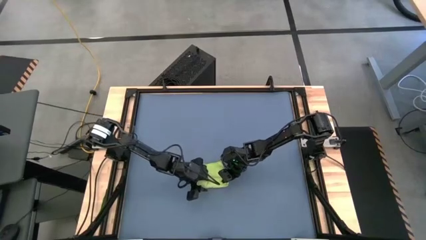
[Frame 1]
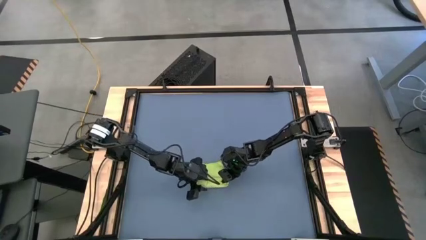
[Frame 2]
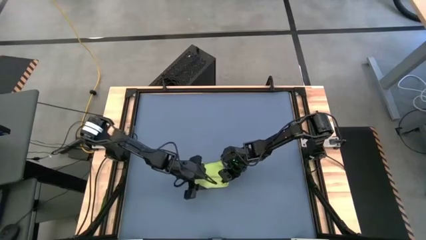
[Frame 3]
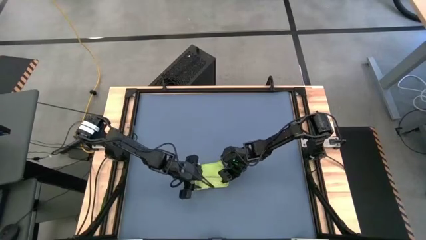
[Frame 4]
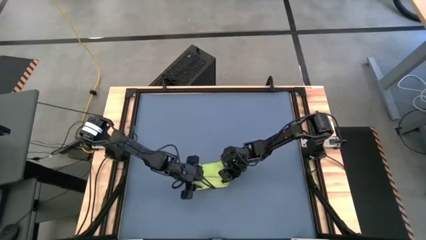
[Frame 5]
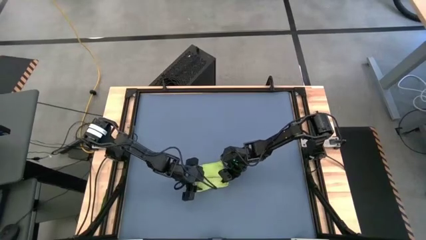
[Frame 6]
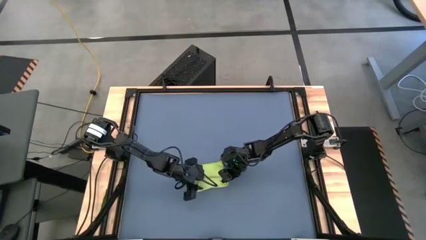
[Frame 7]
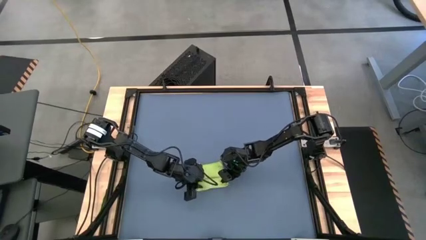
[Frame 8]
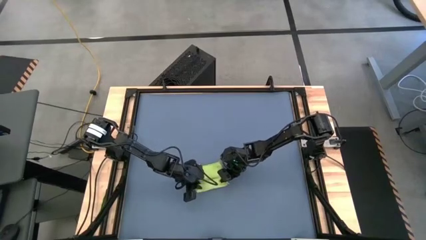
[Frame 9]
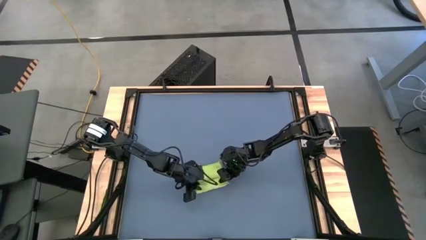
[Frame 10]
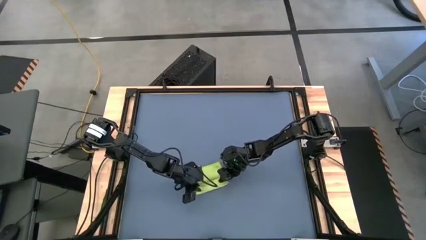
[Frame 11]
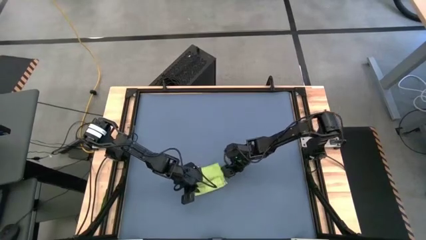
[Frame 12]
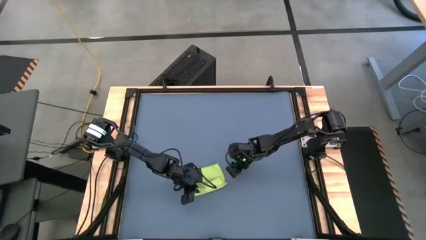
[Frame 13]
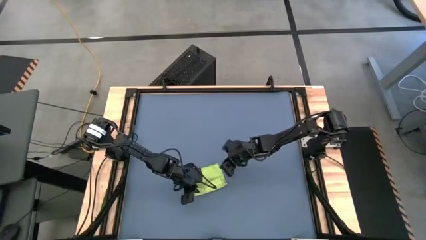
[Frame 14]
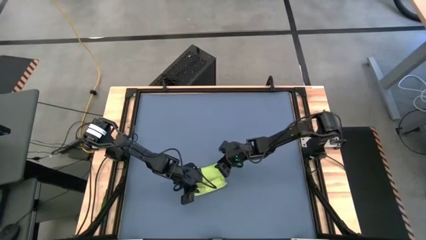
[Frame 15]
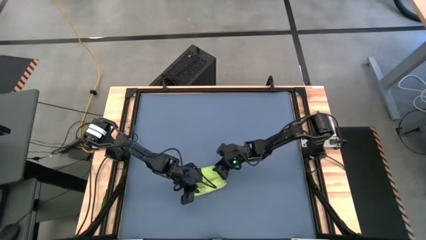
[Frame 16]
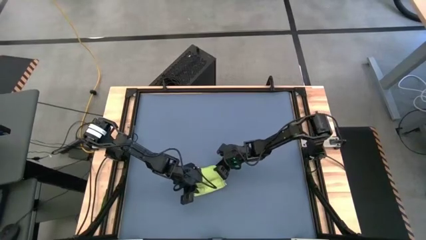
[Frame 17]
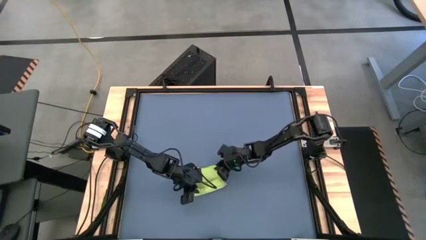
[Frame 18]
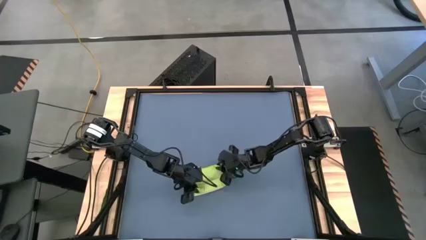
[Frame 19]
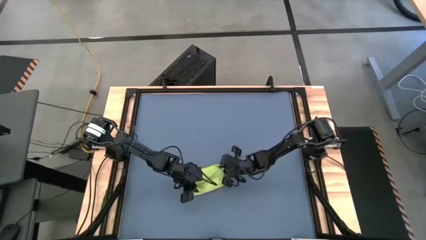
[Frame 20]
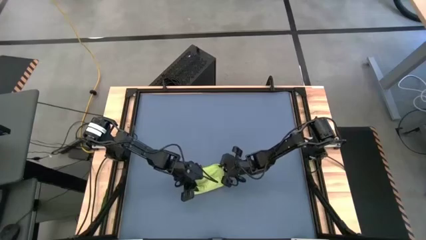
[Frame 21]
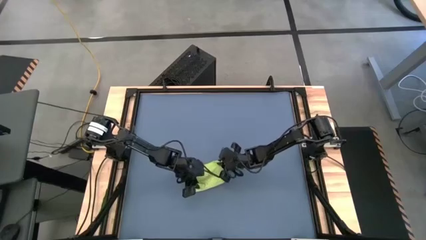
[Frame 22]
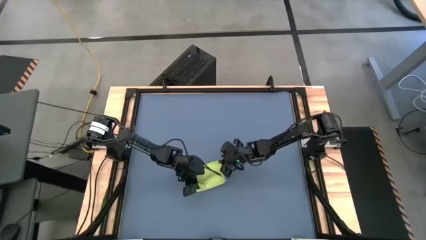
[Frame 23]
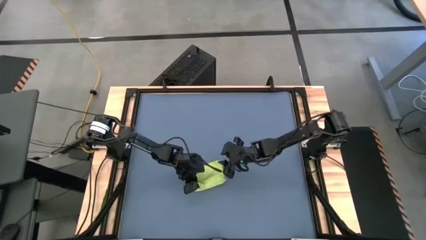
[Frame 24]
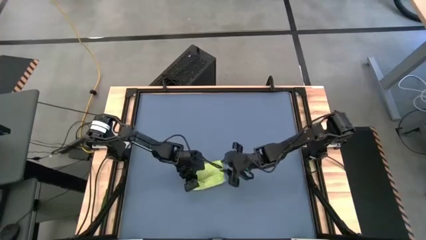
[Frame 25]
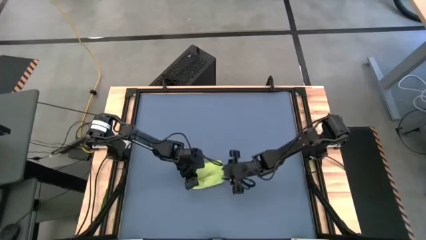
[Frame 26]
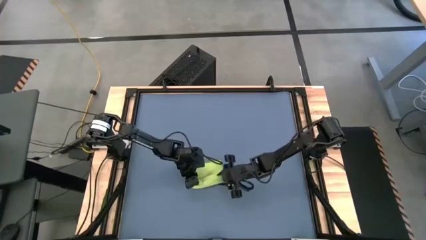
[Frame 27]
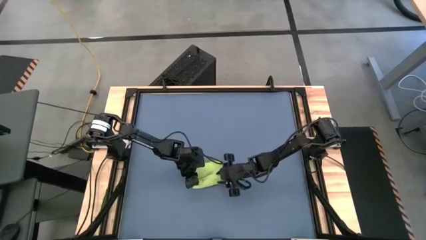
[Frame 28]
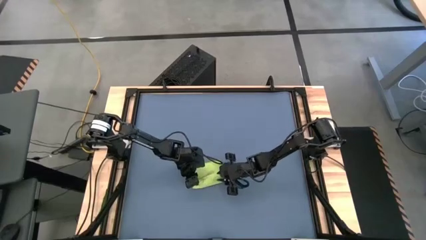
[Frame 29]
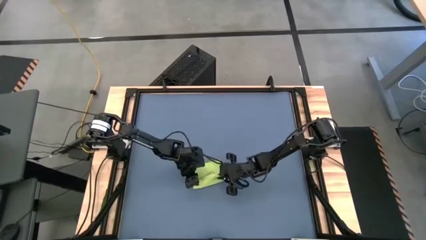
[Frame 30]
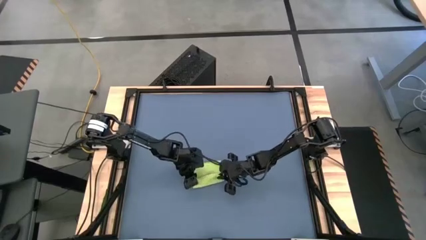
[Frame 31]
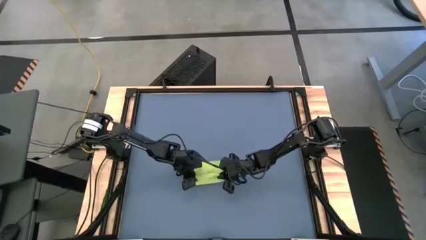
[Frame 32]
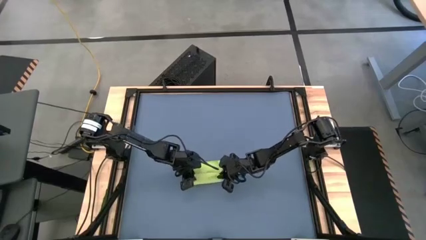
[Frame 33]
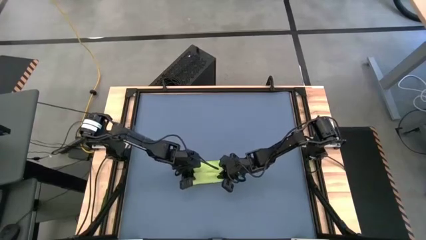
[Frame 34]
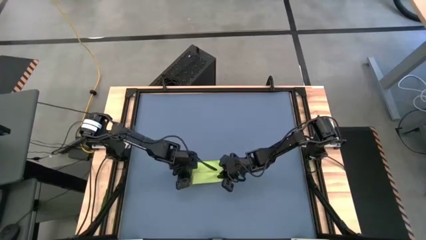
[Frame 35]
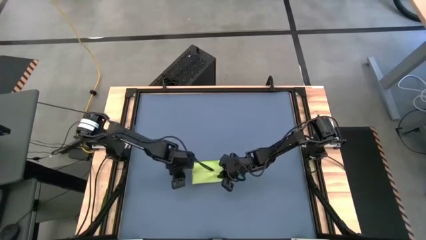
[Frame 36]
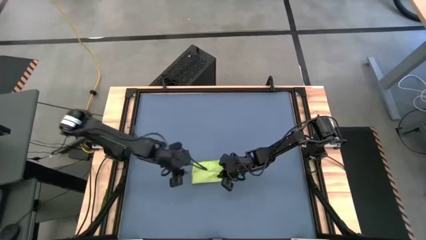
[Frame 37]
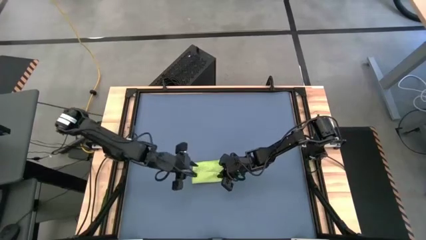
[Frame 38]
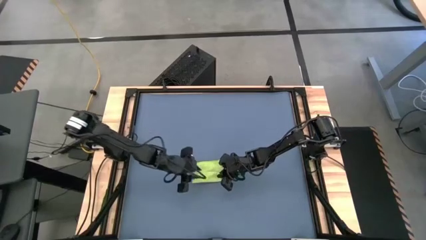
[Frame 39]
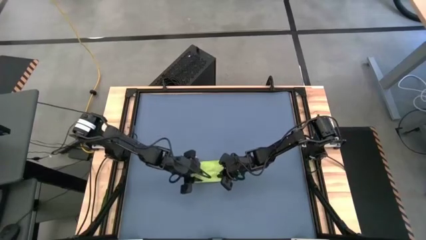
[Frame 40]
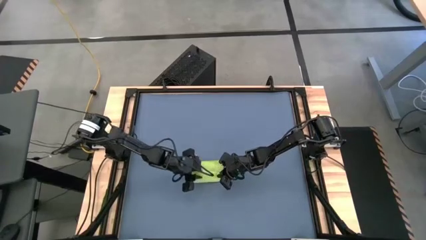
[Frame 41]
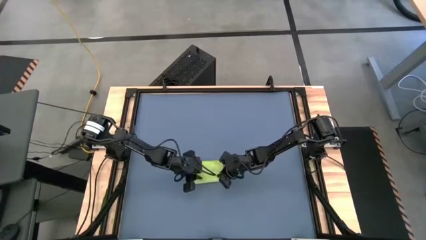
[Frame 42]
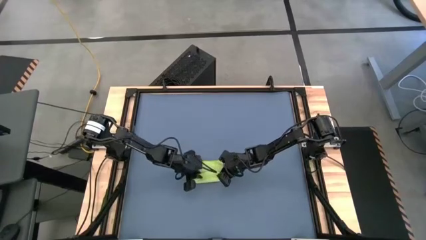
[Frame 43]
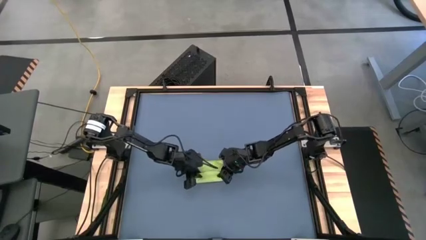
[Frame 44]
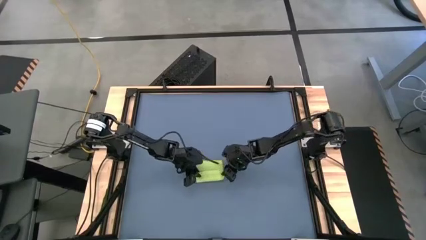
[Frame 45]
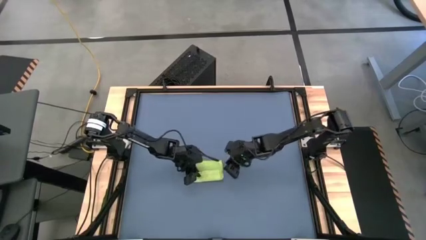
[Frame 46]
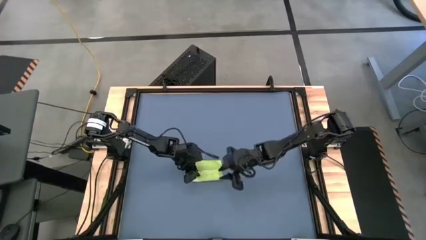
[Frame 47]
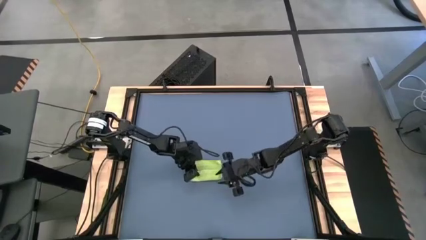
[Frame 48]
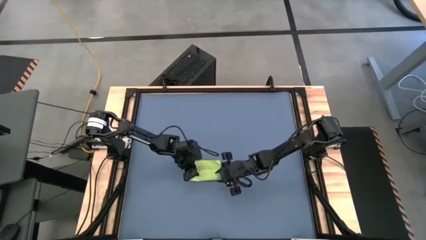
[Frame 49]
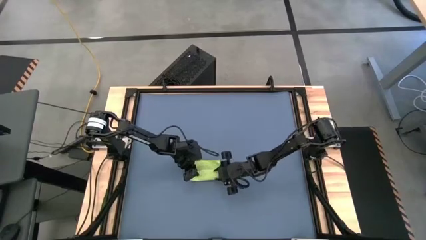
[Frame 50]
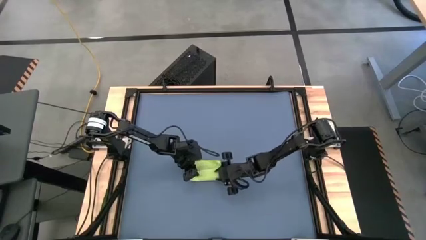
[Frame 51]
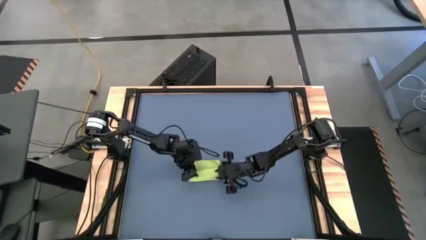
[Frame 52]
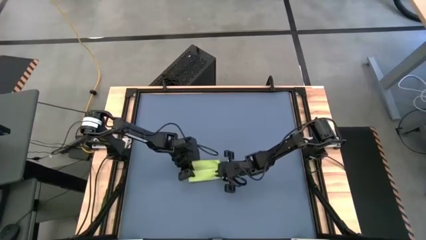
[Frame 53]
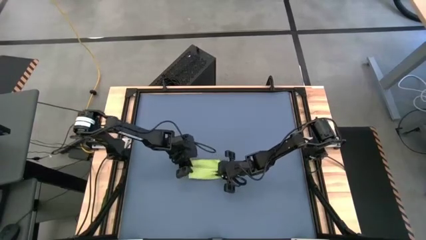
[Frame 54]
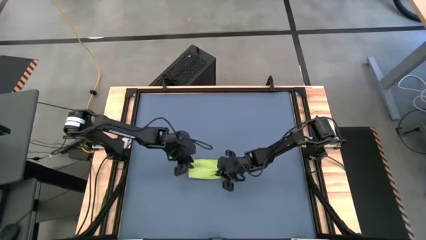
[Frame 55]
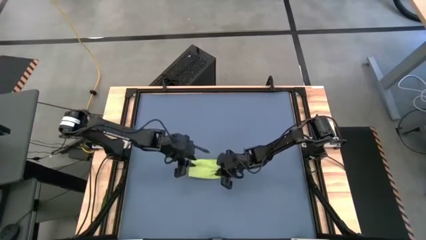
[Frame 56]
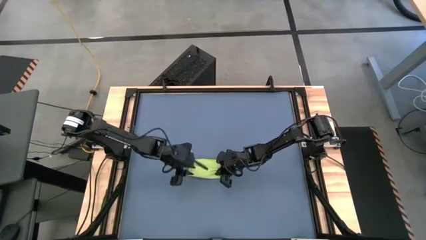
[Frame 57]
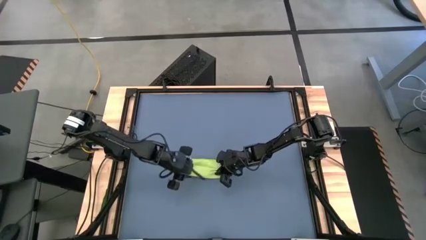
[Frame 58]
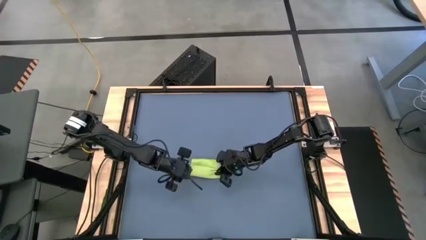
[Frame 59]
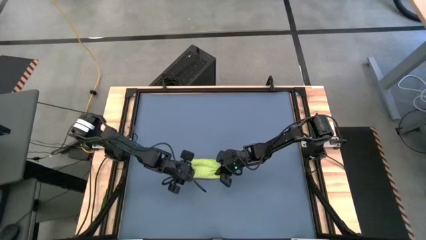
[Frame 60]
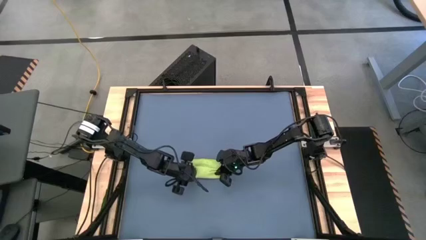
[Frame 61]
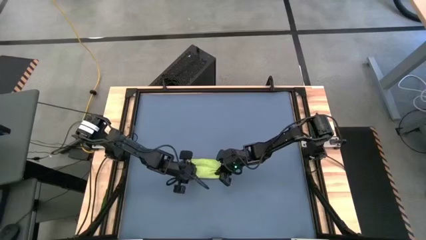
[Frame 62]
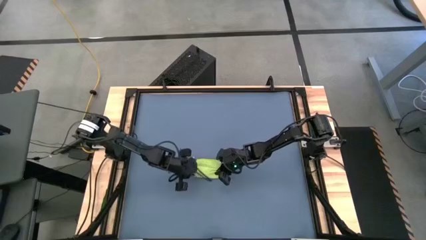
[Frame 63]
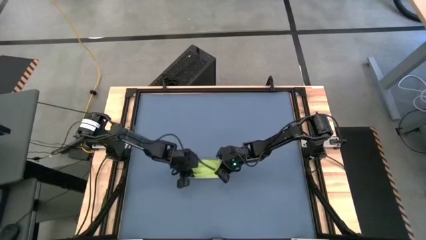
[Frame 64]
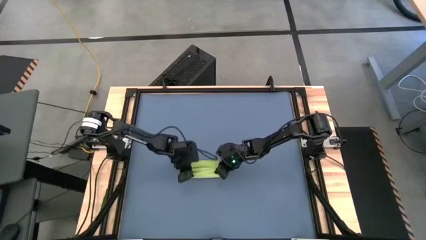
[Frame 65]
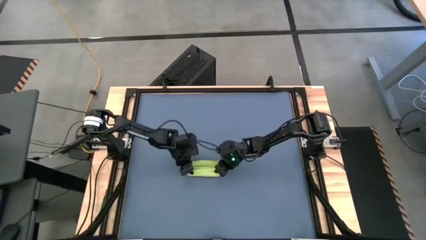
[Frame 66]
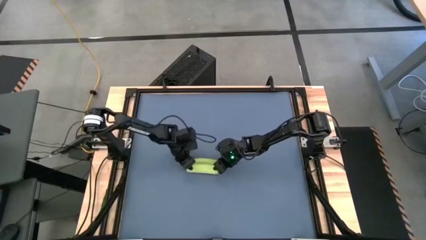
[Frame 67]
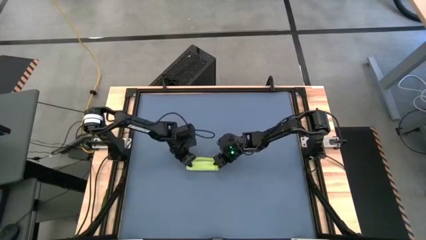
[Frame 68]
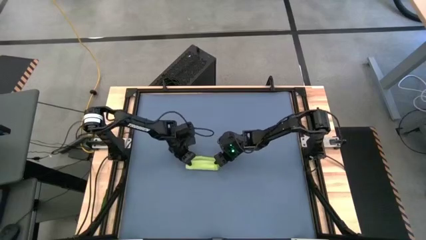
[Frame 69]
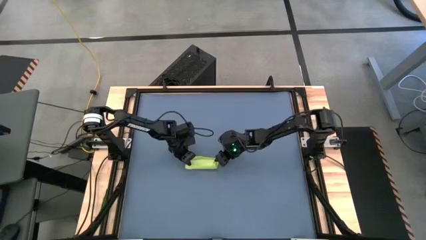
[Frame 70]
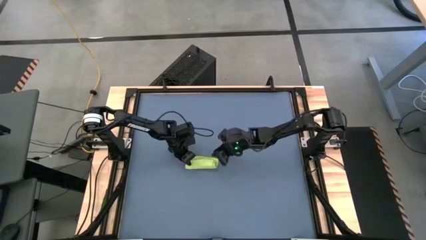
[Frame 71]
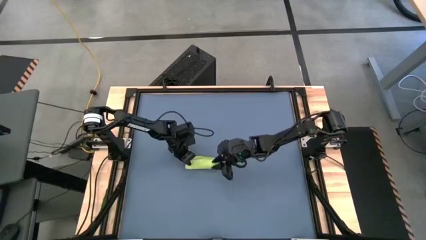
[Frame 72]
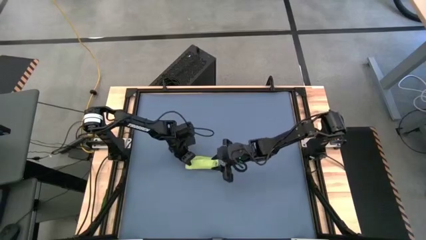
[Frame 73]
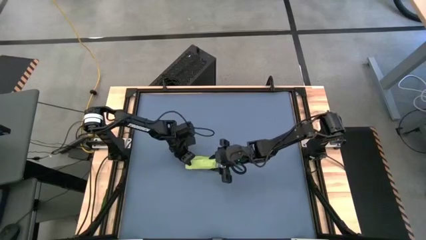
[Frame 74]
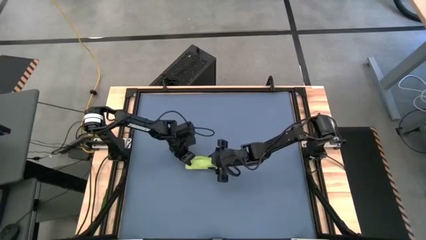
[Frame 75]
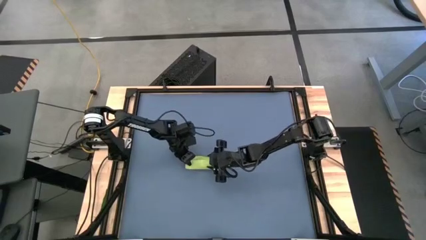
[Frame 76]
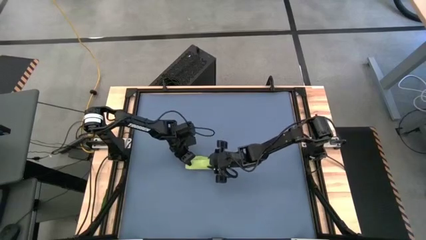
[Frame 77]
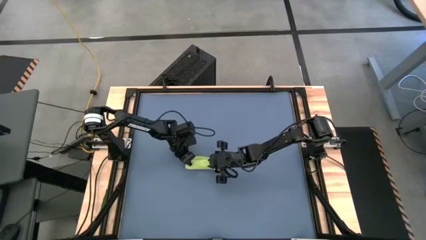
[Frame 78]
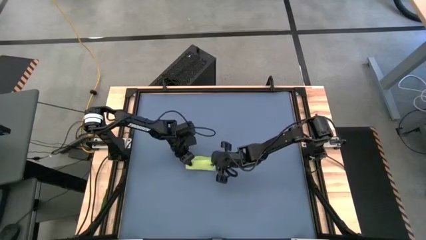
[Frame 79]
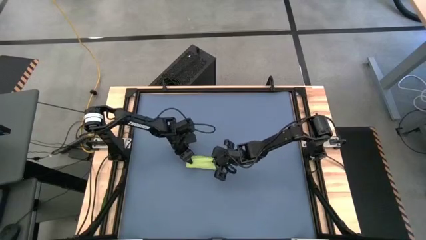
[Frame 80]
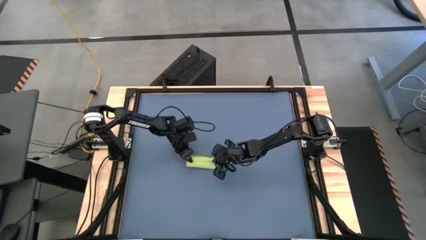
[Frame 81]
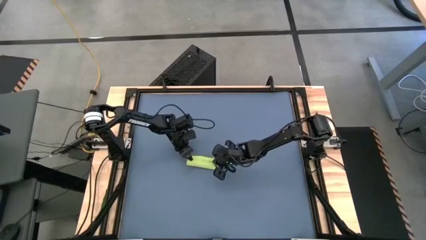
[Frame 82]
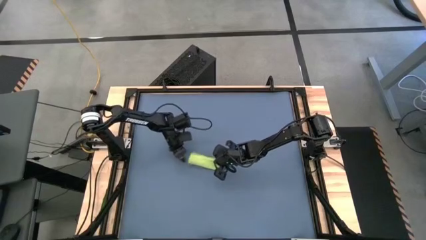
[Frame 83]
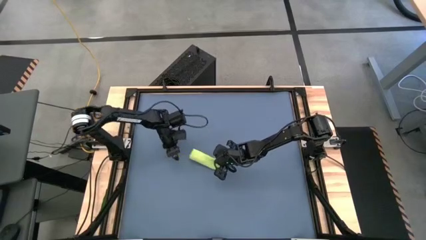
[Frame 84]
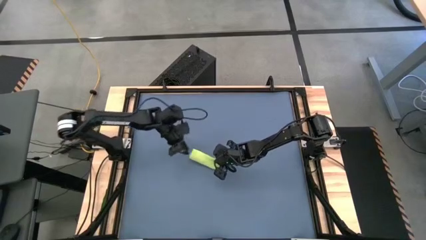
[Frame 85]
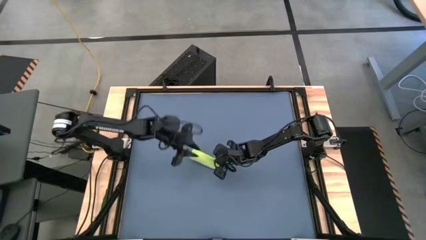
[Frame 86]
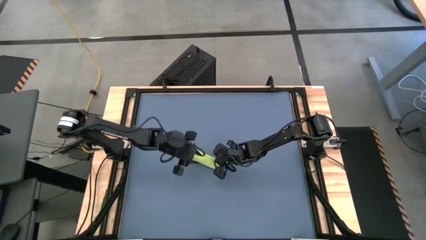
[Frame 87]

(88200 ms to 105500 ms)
Task: Roll towel
Roll the green microfiber towel
